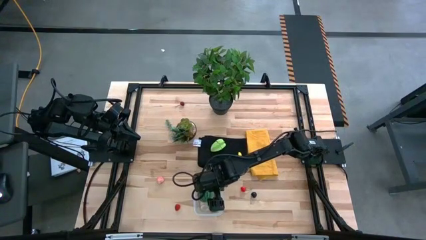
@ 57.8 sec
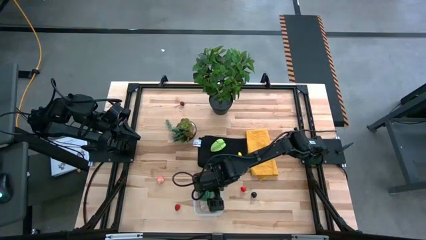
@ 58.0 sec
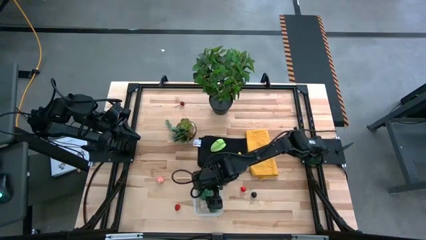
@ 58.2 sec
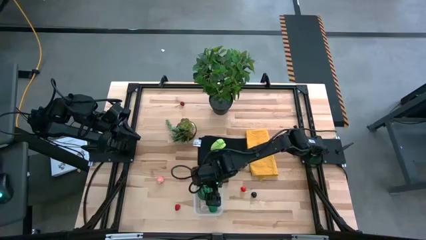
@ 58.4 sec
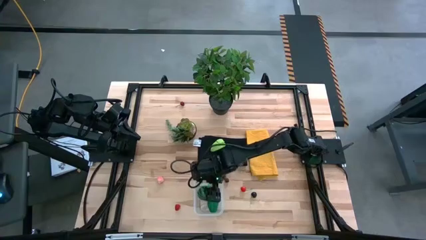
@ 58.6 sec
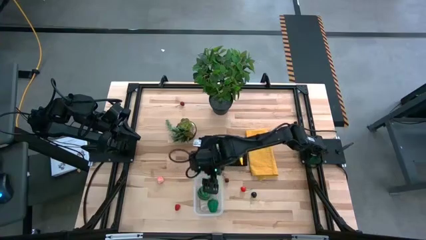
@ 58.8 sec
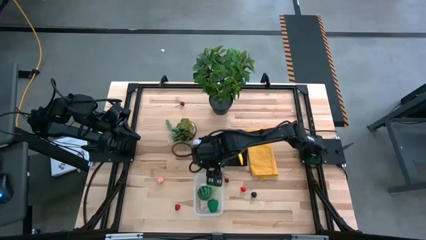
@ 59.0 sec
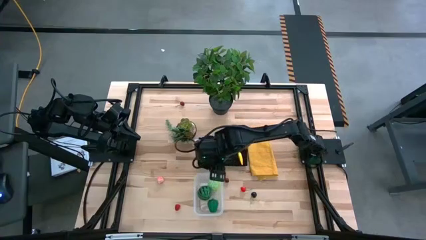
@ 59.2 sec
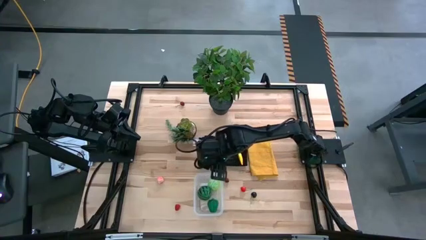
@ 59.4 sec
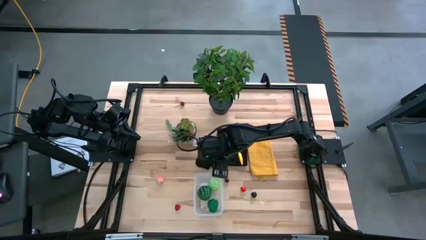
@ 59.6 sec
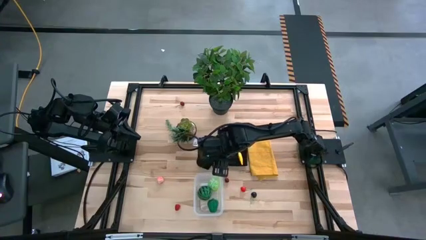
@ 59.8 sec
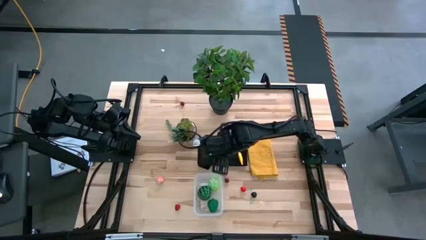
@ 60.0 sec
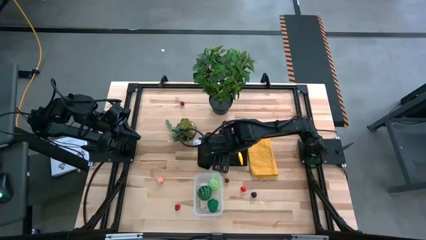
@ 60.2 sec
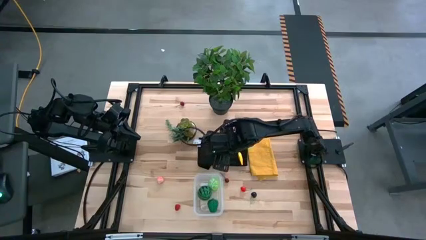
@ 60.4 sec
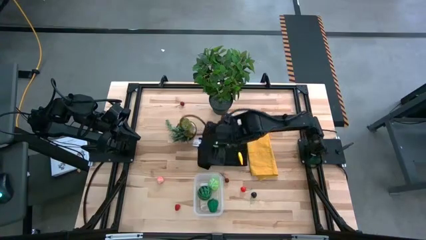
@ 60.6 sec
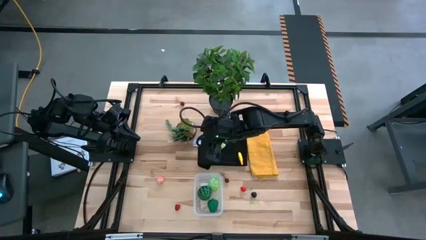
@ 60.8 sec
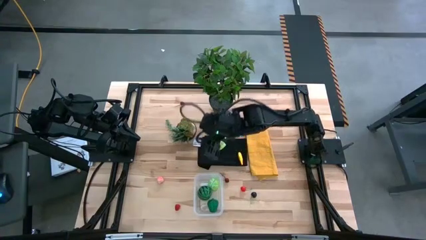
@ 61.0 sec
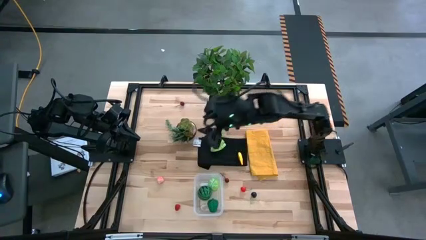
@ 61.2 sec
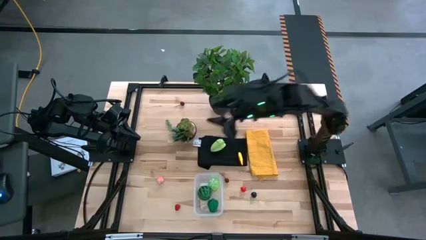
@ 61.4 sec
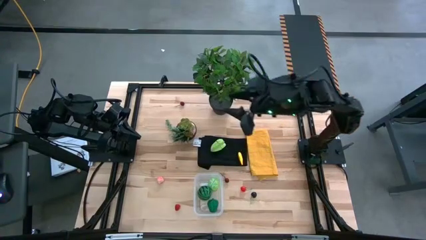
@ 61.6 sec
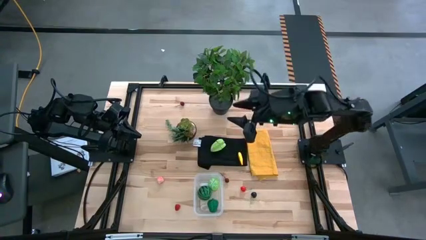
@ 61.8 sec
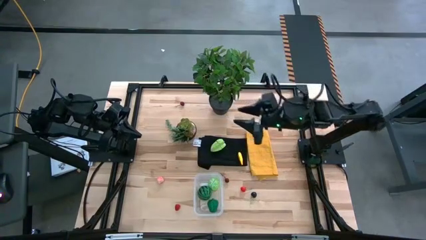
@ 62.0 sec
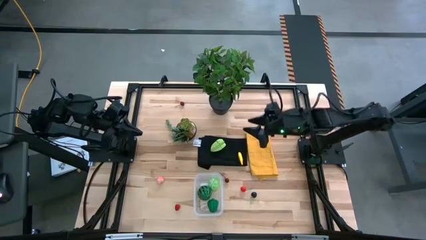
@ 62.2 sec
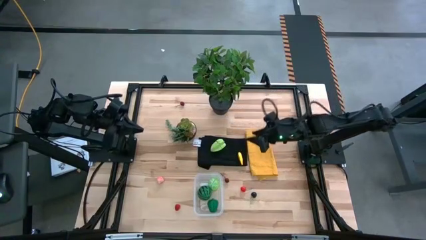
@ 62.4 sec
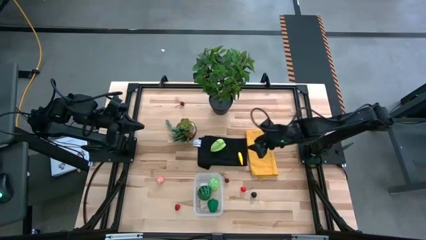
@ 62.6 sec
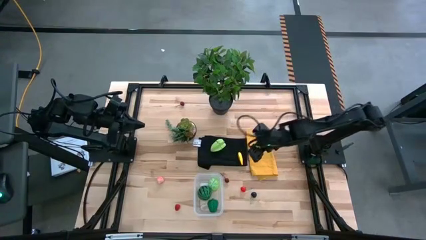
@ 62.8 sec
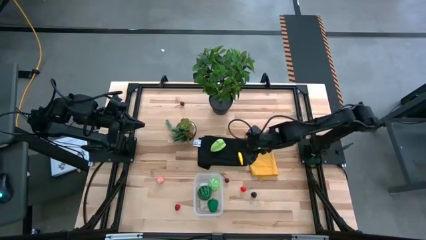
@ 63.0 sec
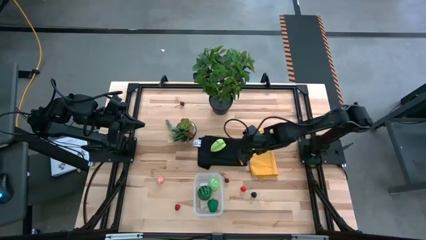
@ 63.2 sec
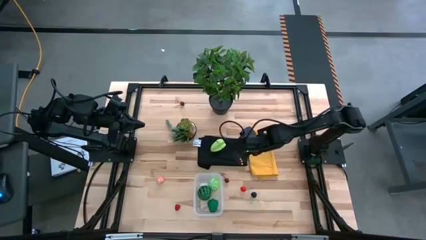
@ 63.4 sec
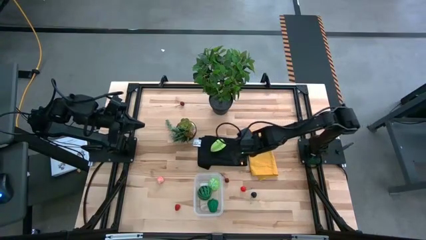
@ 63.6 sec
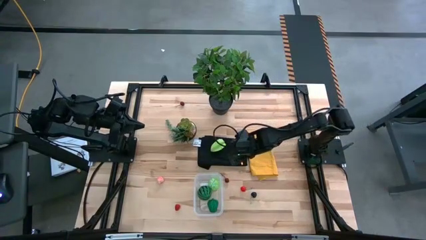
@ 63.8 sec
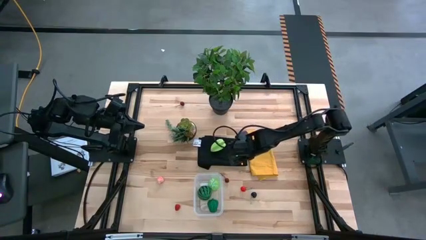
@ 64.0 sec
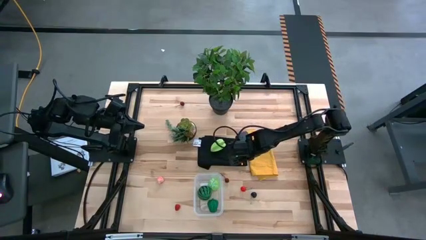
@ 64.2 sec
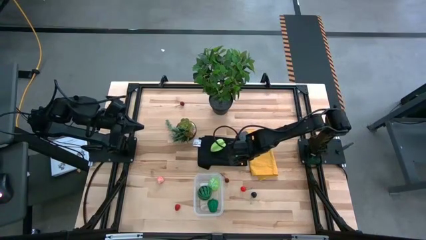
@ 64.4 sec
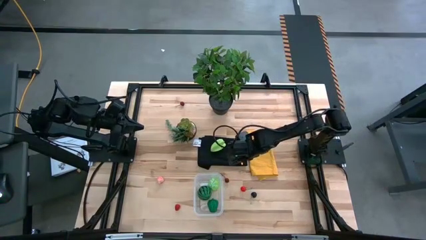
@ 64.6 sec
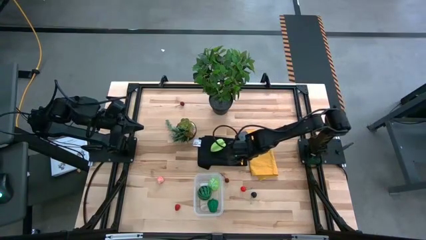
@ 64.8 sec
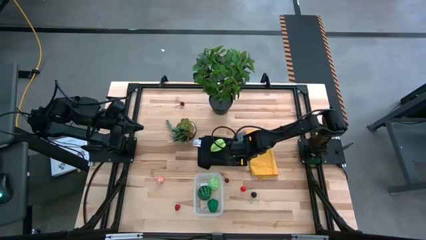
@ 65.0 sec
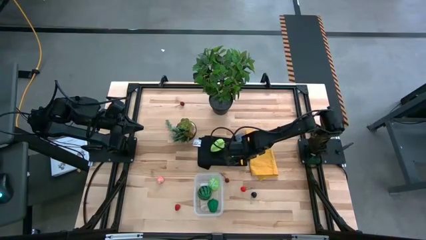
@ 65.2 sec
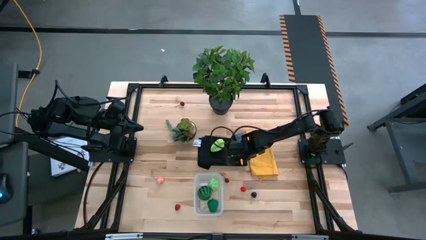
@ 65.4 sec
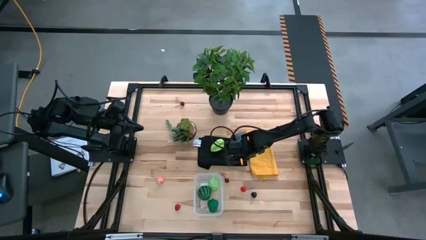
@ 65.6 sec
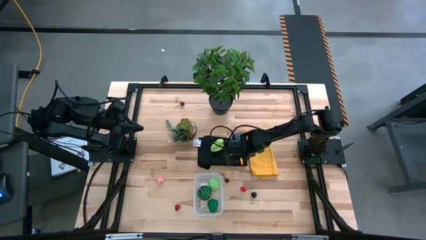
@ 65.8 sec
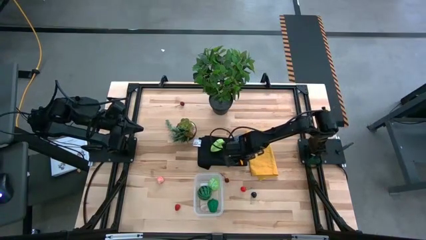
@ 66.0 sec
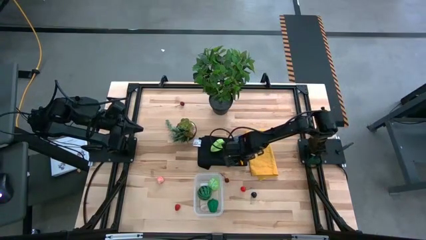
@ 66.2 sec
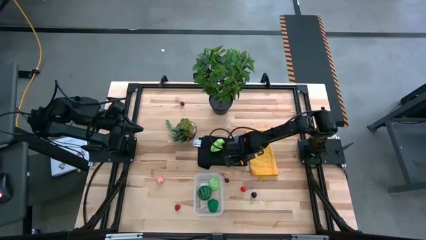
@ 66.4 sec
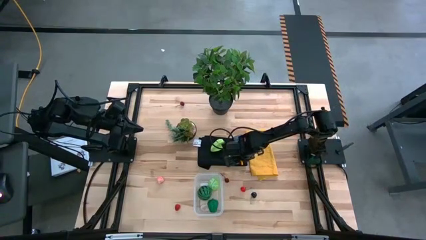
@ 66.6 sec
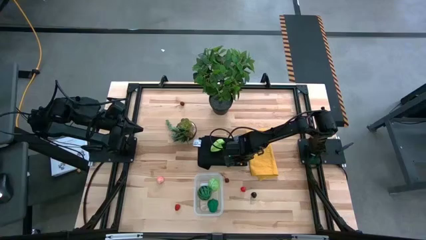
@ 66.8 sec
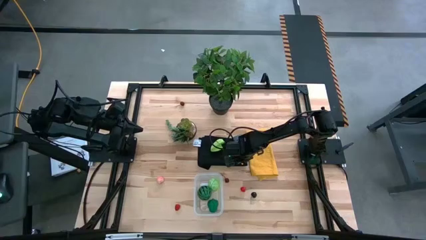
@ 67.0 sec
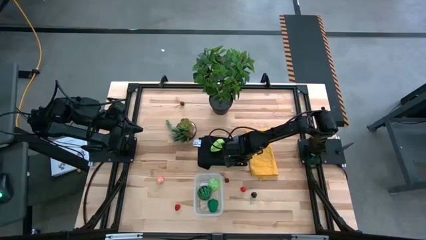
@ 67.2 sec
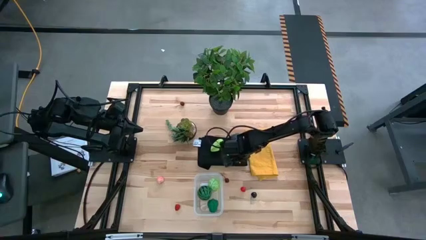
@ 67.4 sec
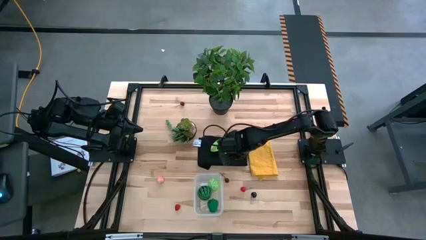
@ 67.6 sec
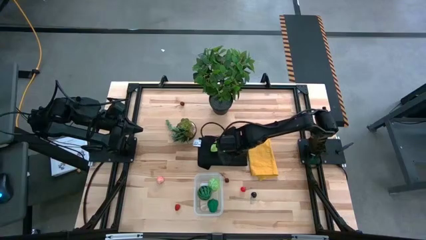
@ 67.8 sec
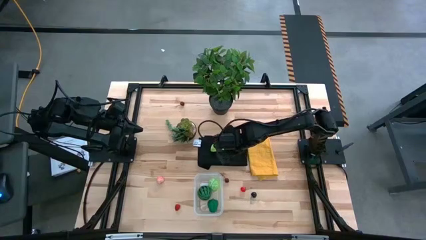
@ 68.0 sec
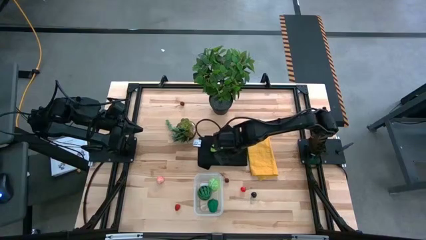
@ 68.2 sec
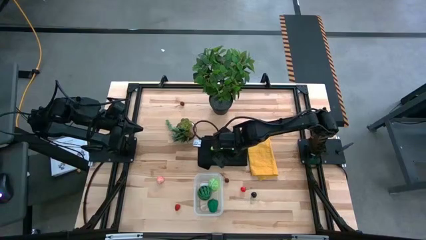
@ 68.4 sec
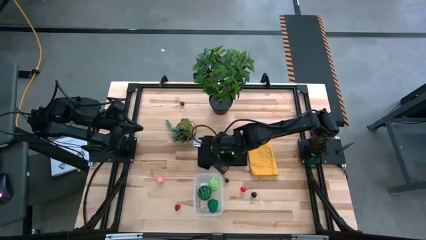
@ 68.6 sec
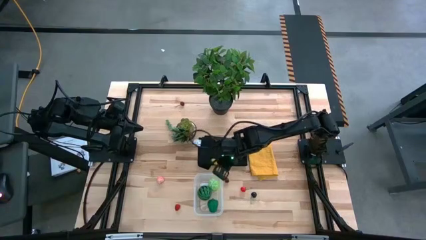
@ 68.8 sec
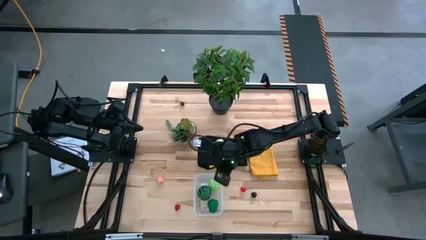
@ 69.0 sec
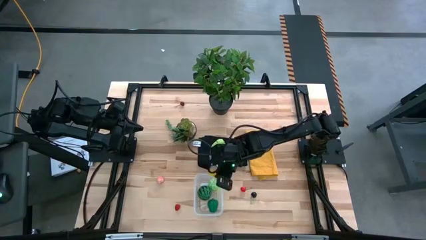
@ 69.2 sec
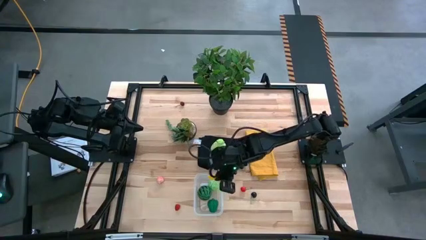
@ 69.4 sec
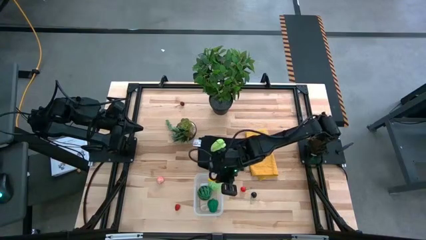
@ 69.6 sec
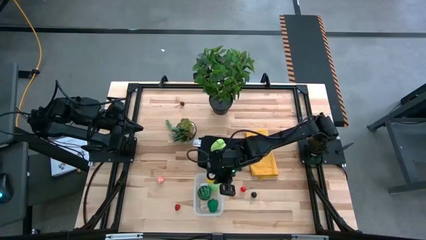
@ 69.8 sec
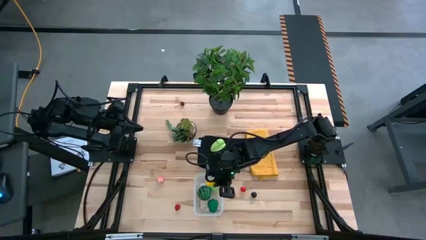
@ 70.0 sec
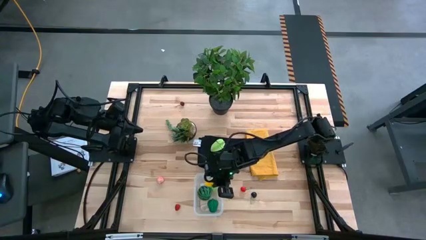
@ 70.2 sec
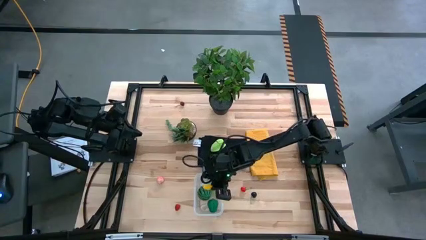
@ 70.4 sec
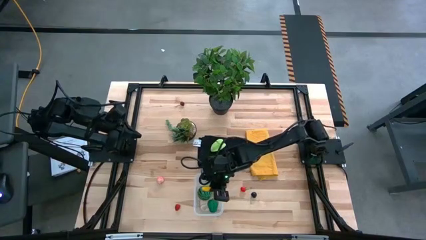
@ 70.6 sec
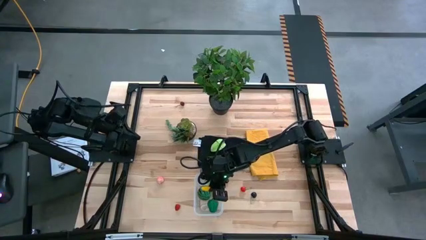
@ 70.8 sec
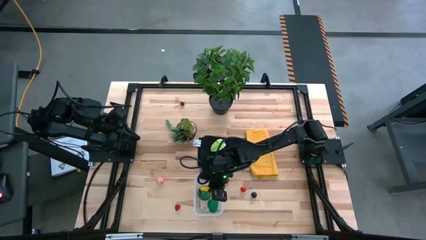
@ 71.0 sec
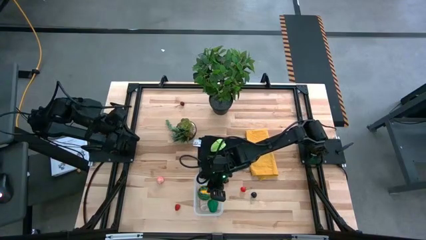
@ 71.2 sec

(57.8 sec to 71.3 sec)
Task: Pick and placing Produce into tupperware
Put the corn into the bin
